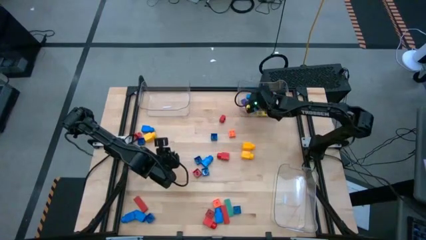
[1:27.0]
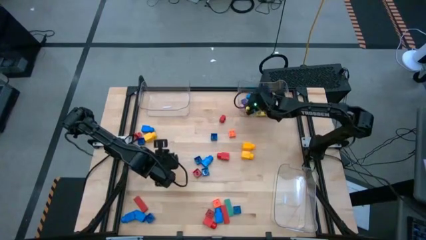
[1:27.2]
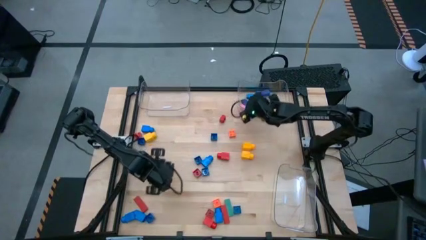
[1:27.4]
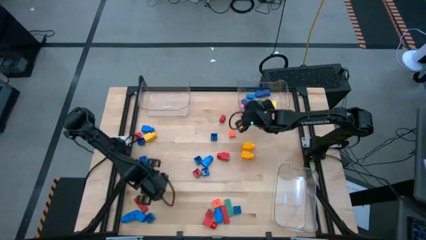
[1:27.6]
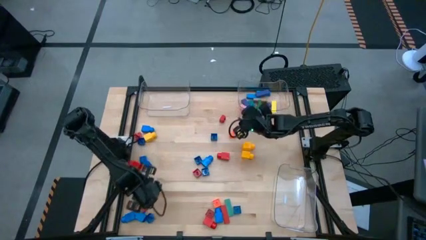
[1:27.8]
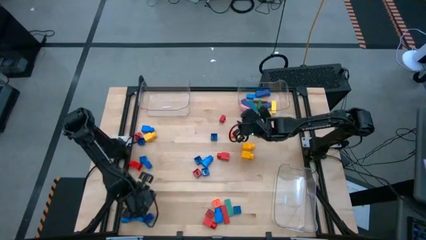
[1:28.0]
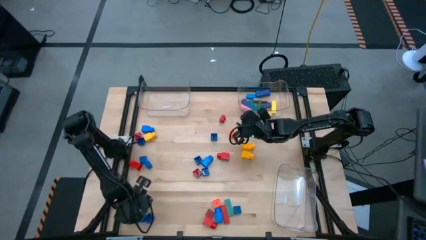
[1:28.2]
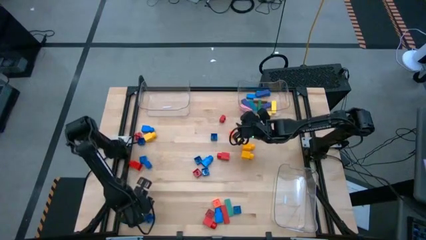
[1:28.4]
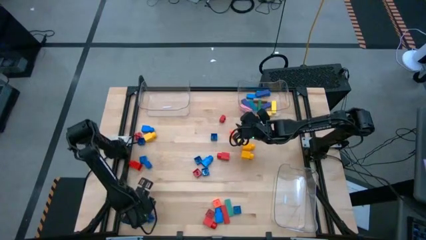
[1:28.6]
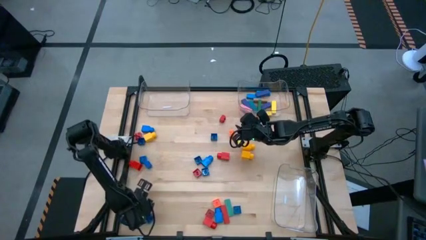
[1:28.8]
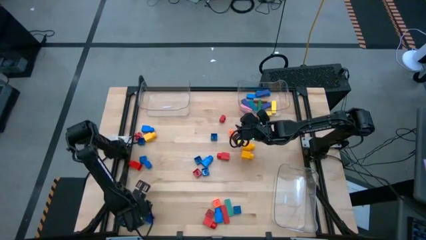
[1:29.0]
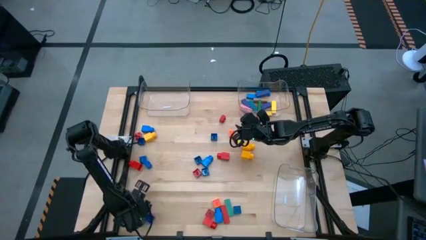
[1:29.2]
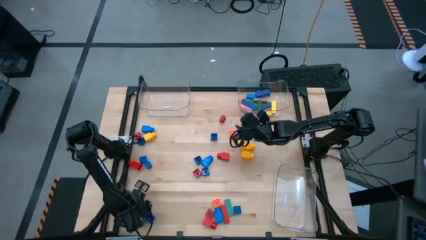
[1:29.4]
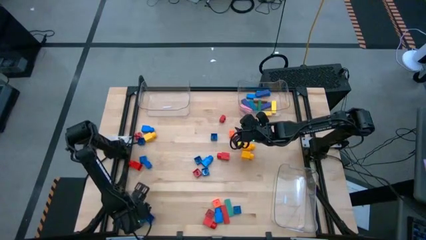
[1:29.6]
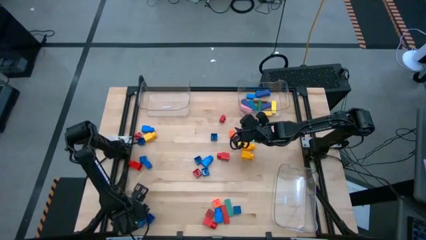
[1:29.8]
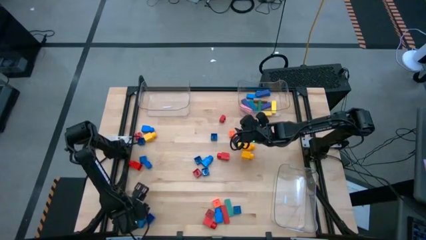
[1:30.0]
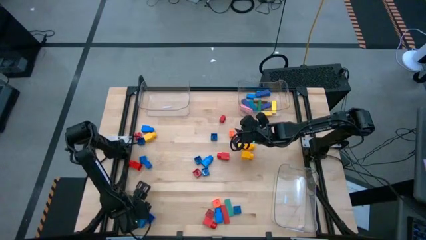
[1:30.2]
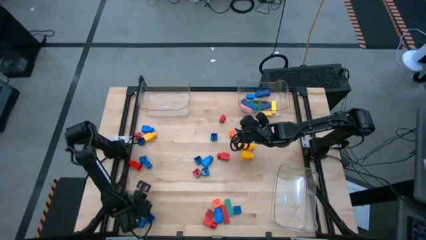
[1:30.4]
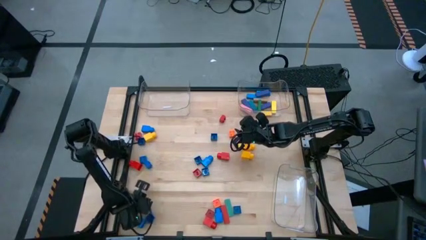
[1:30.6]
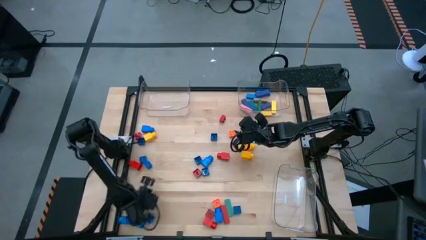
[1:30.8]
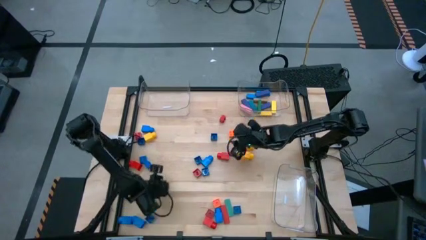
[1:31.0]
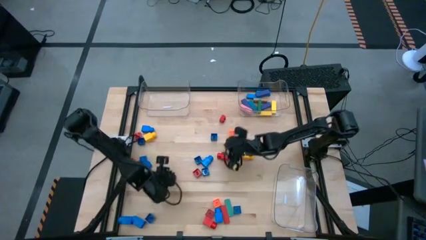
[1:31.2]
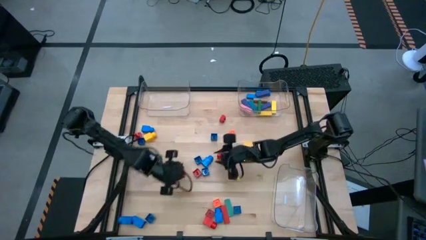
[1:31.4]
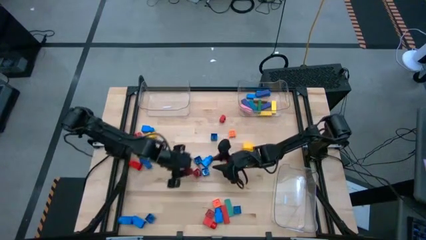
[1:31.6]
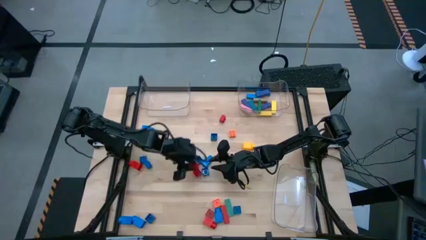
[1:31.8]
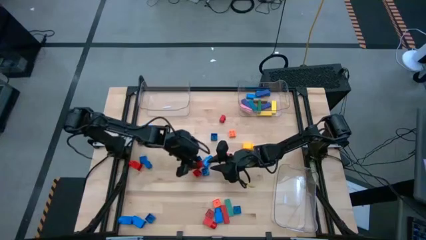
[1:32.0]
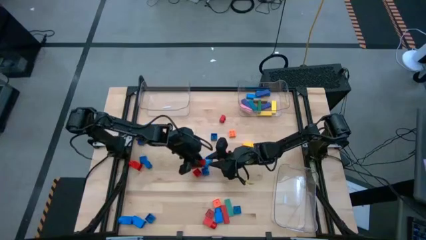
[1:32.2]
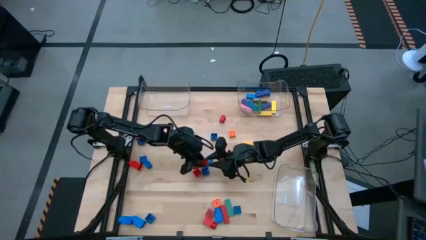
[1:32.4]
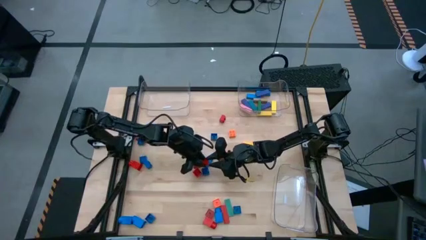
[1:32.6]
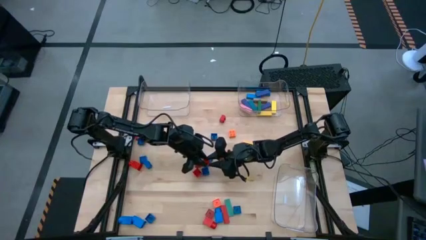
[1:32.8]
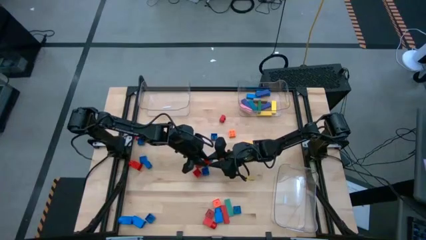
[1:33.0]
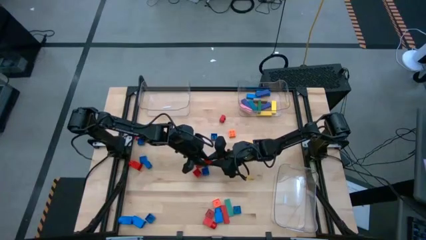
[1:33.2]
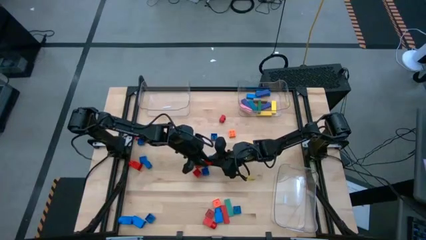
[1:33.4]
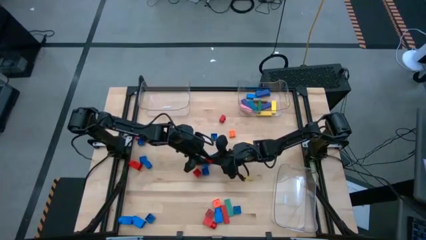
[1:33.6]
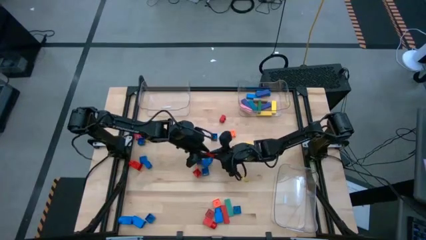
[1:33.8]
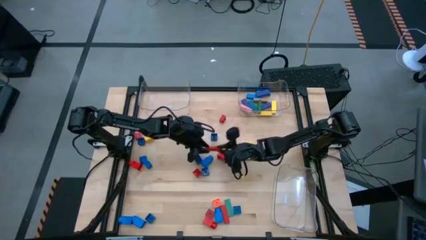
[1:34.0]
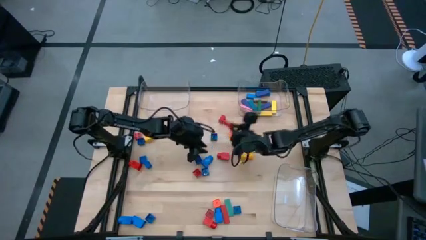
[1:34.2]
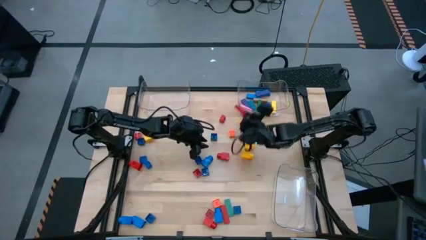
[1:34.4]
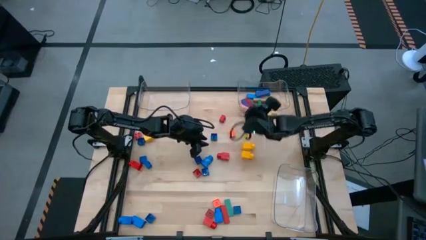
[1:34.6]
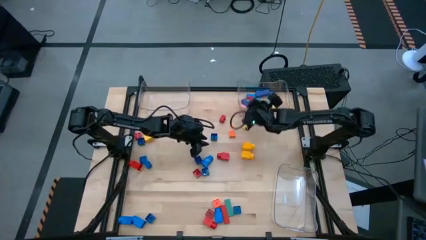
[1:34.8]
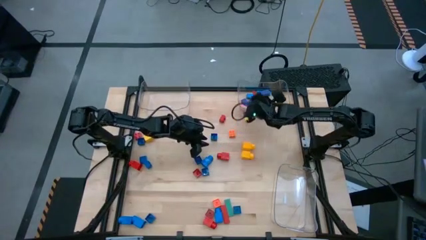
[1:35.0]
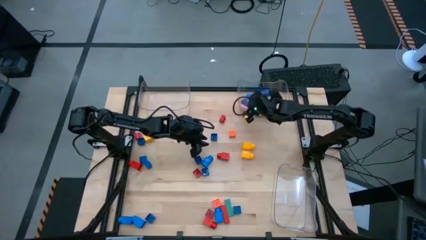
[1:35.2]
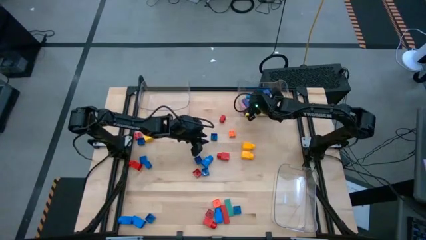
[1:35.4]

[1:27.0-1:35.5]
Task: Sort blocks by size
Put the red block into the top right transparent bin

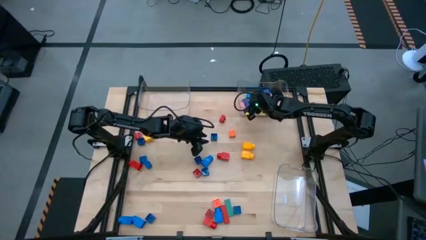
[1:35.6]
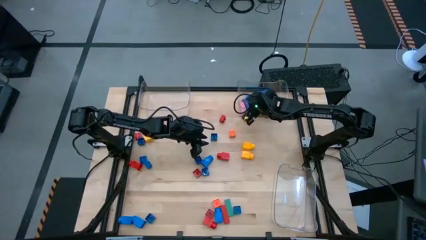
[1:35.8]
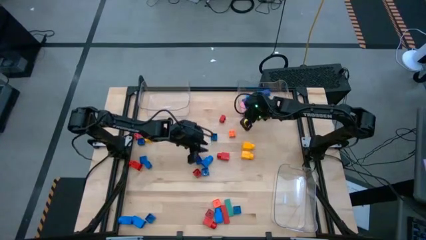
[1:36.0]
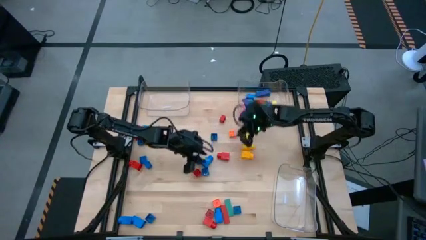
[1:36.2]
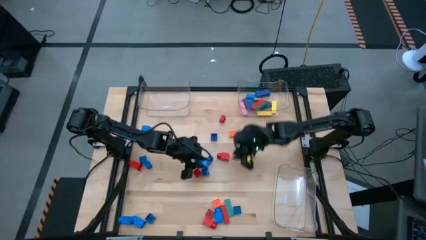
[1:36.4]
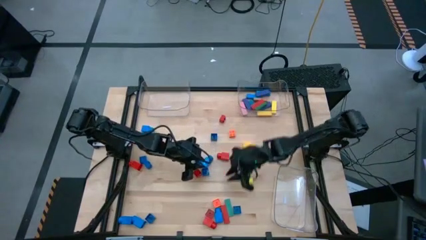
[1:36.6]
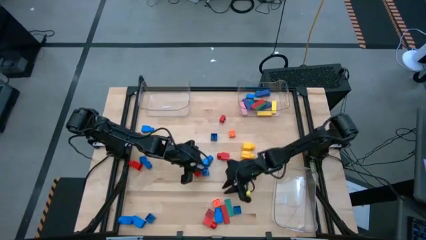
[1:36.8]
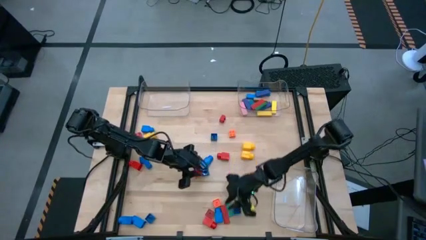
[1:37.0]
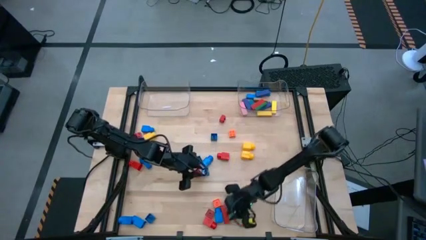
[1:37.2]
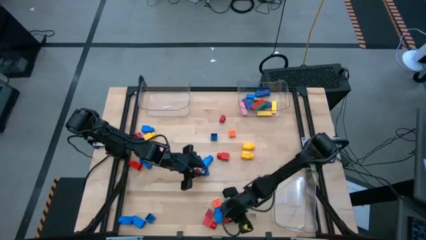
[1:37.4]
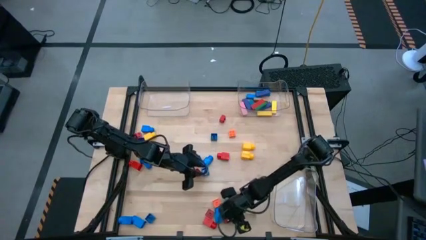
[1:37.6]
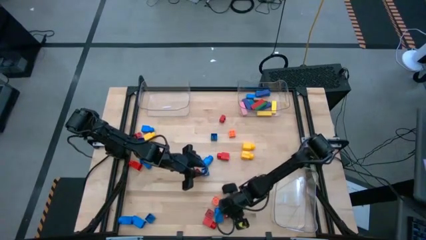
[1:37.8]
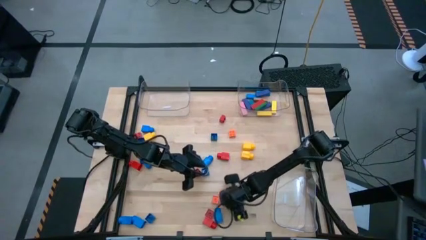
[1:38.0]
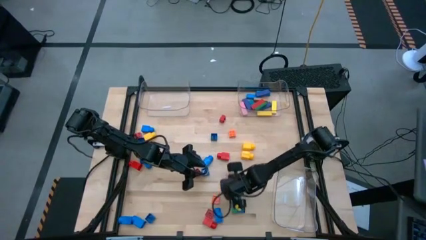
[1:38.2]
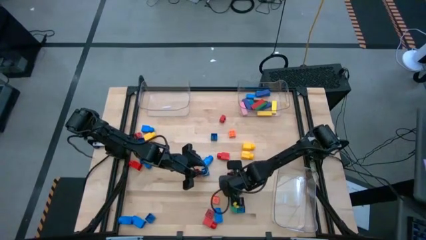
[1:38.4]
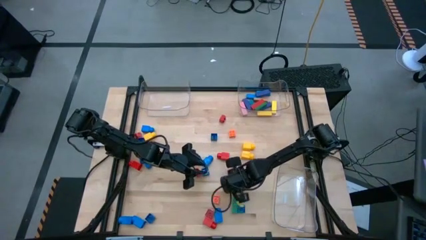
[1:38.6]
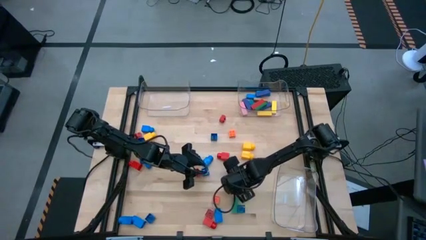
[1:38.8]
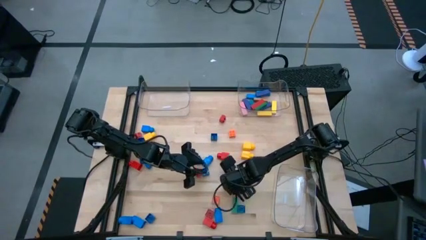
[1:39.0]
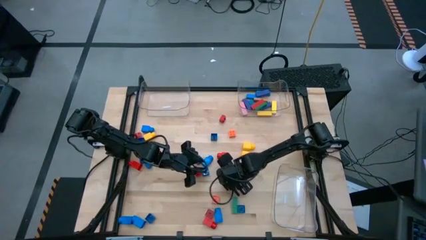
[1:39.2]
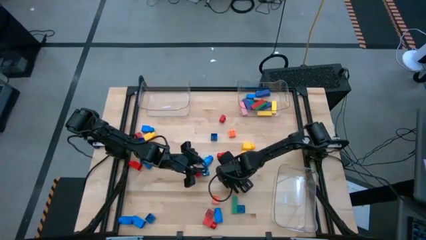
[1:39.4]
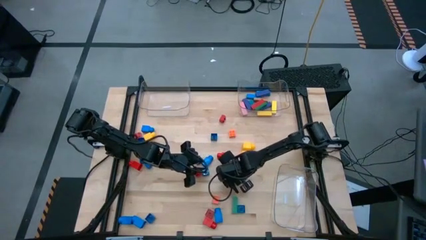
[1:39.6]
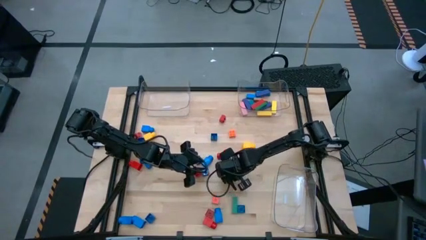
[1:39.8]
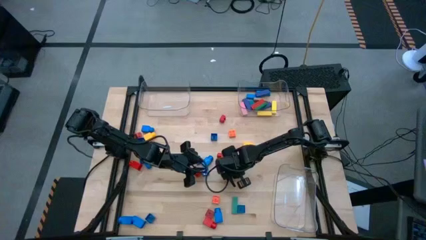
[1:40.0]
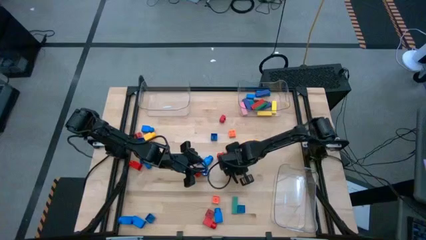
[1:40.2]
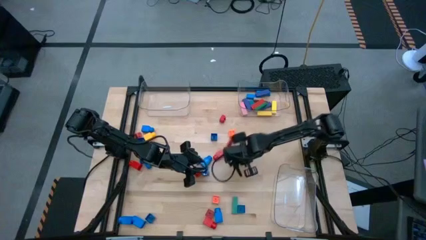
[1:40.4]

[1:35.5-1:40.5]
Put the red block into the top right transparent bin

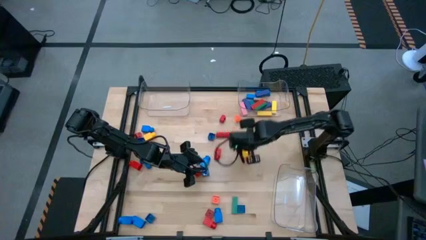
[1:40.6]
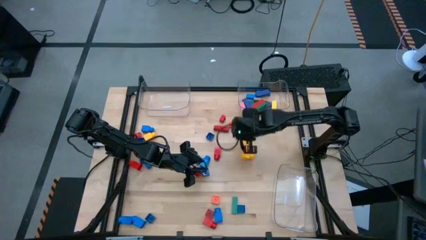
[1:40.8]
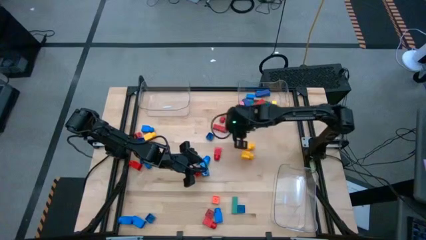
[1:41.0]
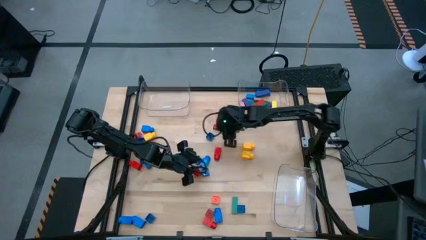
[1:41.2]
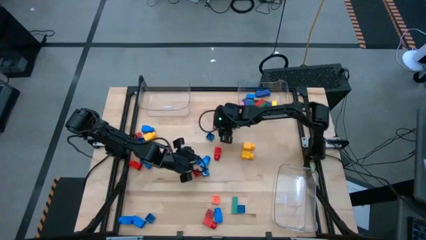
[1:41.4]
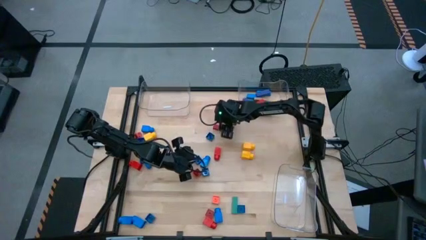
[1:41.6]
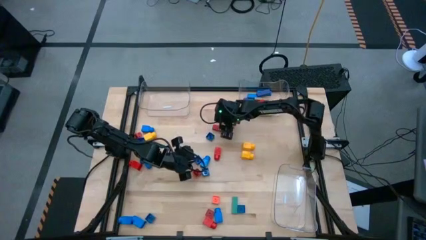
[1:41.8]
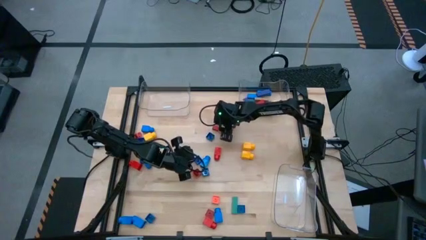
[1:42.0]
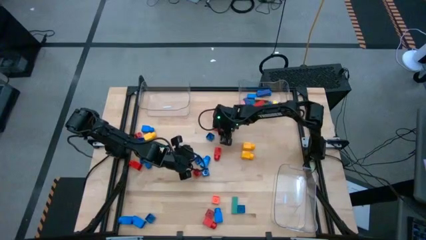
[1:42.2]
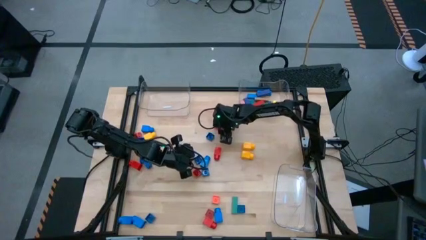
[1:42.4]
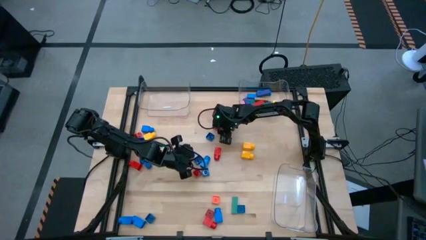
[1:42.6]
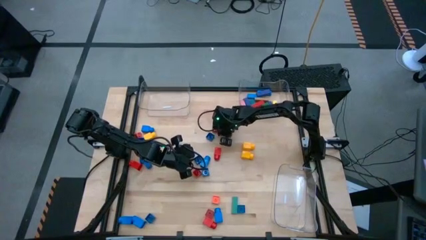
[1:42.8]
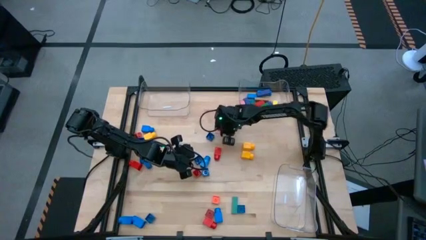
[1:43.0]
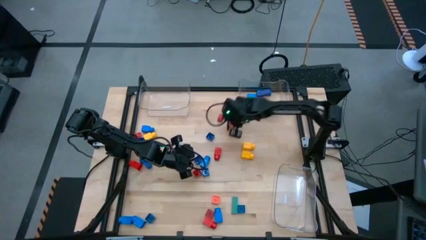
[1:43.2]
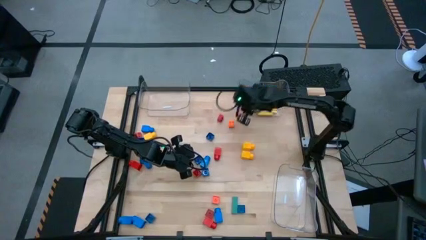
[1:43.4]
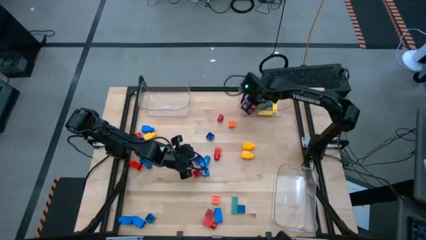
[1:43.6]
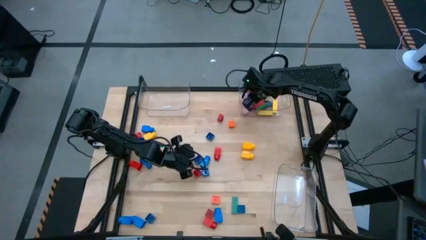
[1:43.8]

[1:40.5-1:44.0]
Put the red block into the top right transparent bin
